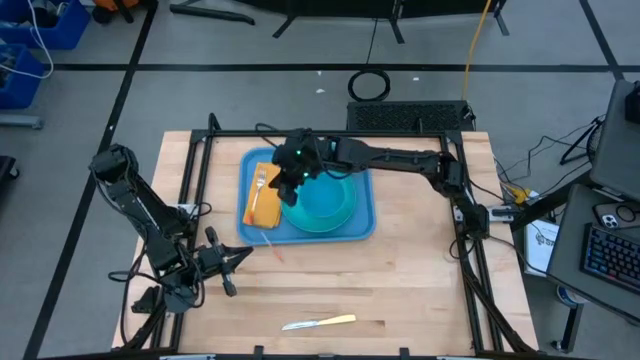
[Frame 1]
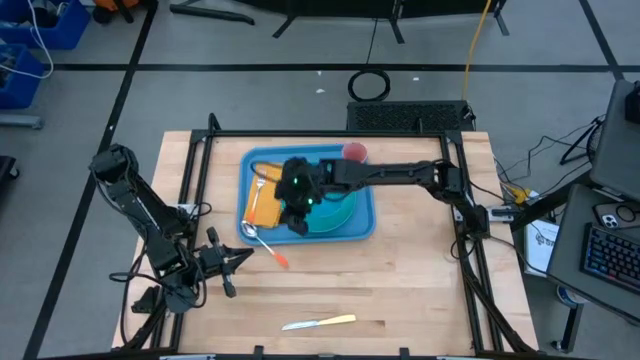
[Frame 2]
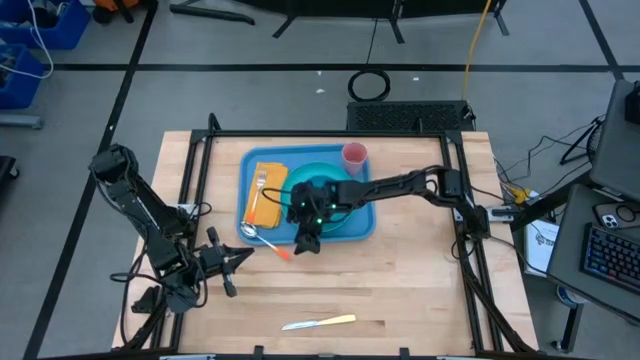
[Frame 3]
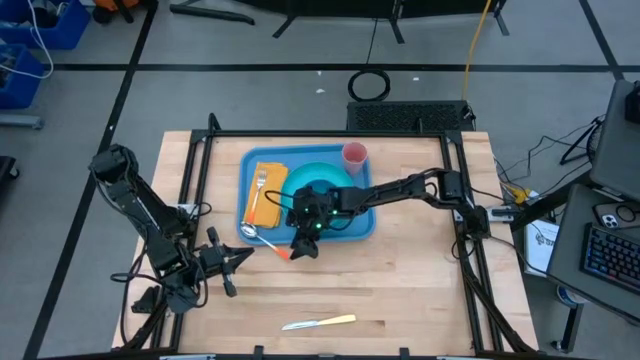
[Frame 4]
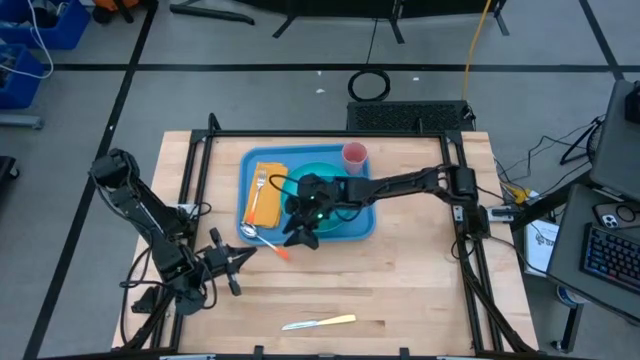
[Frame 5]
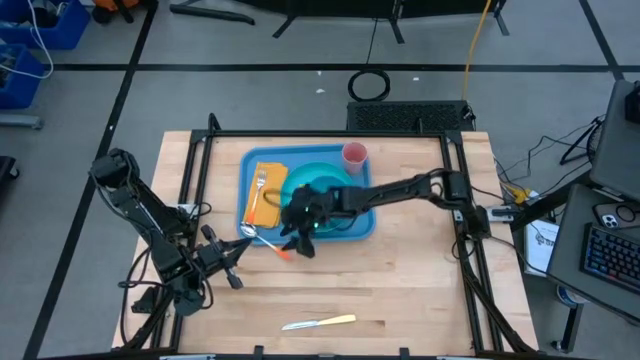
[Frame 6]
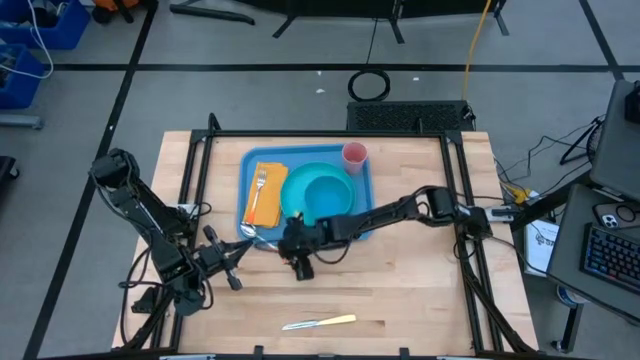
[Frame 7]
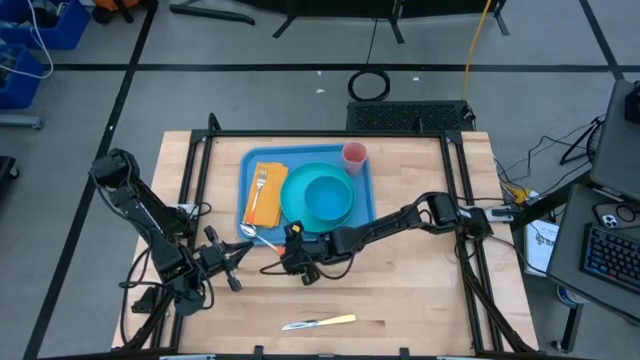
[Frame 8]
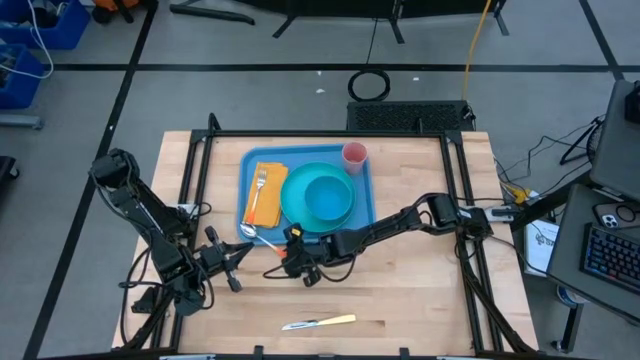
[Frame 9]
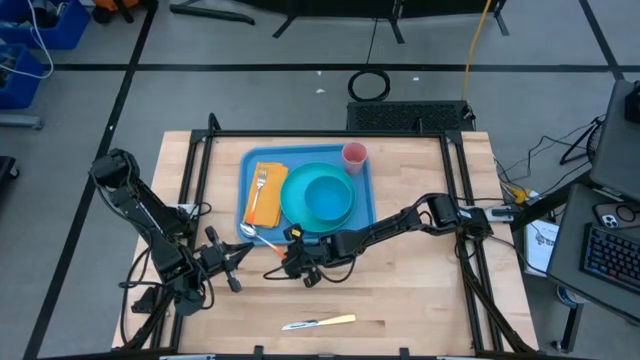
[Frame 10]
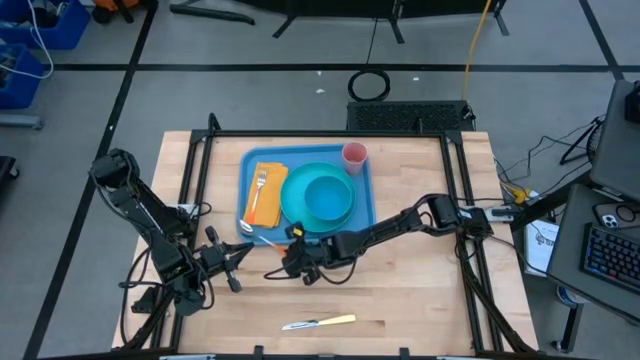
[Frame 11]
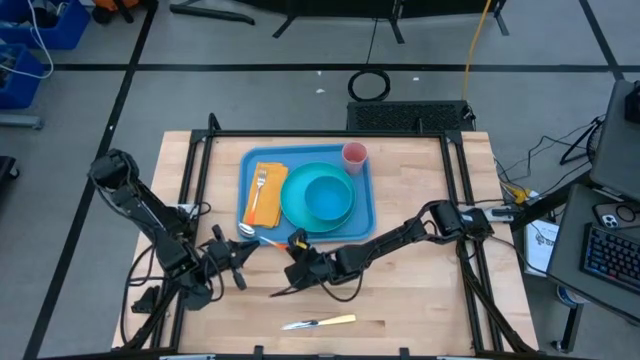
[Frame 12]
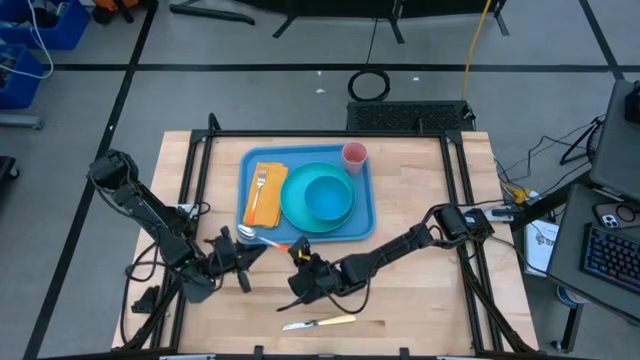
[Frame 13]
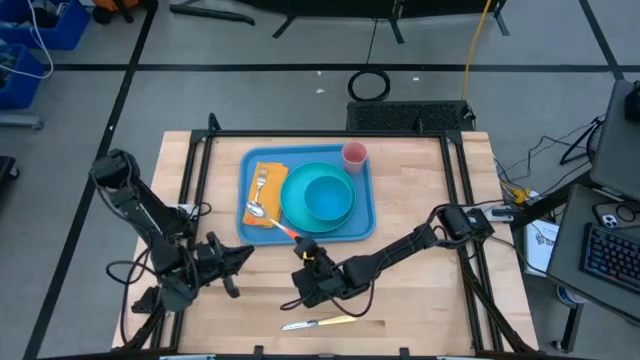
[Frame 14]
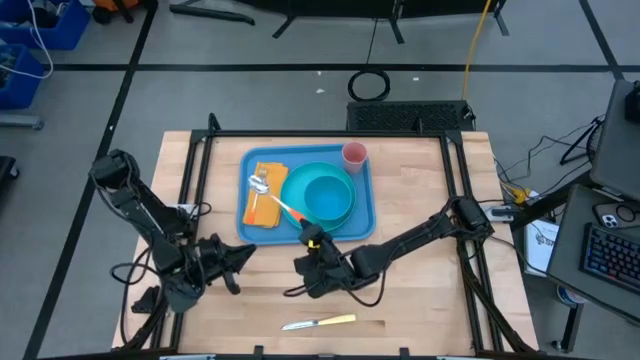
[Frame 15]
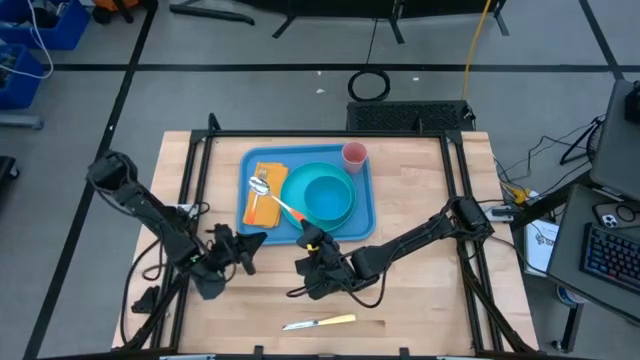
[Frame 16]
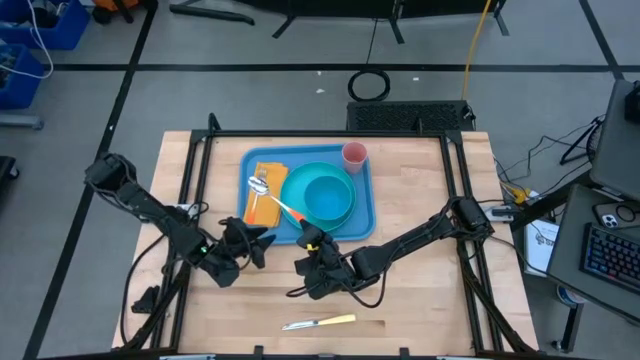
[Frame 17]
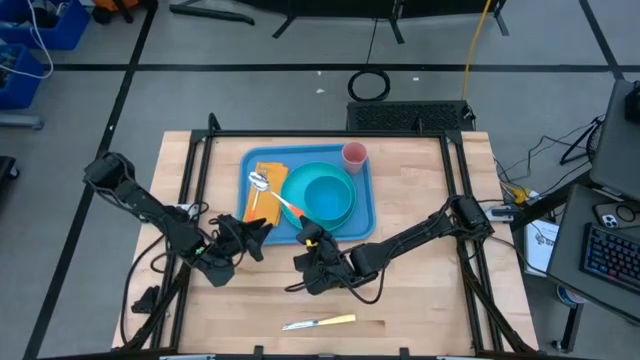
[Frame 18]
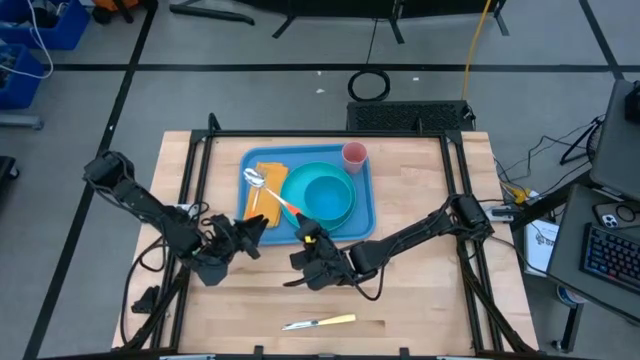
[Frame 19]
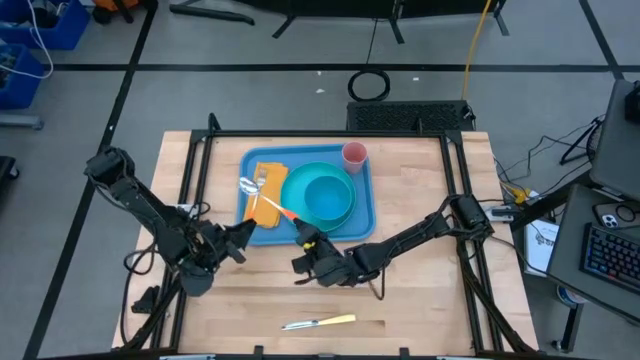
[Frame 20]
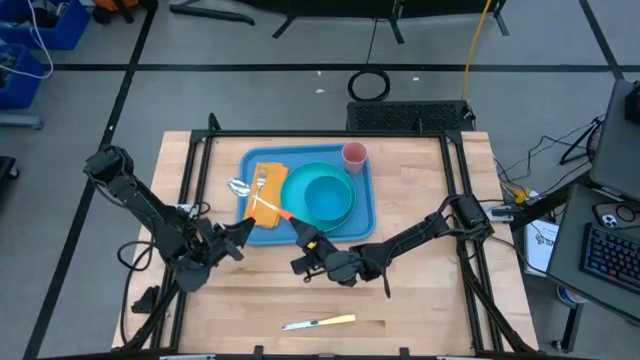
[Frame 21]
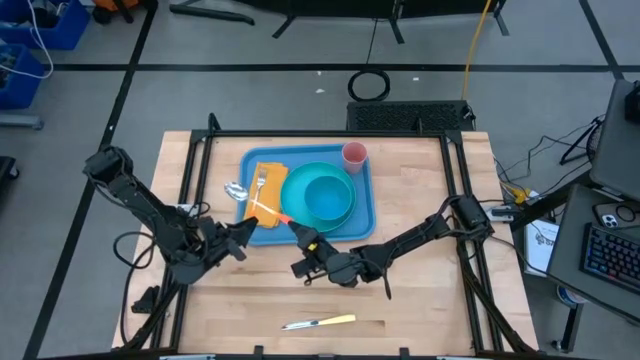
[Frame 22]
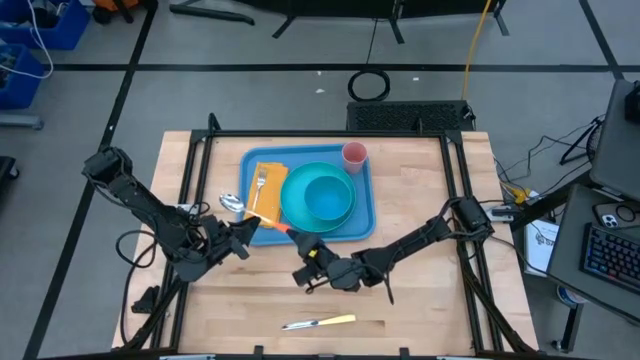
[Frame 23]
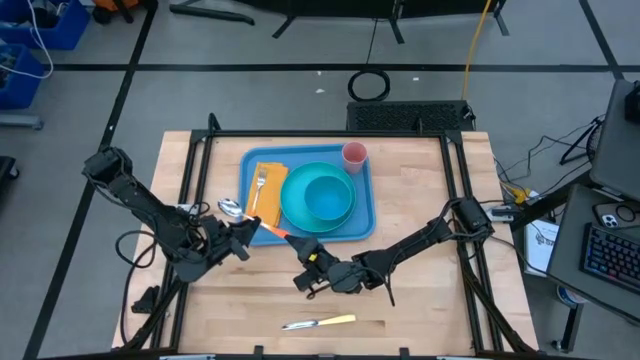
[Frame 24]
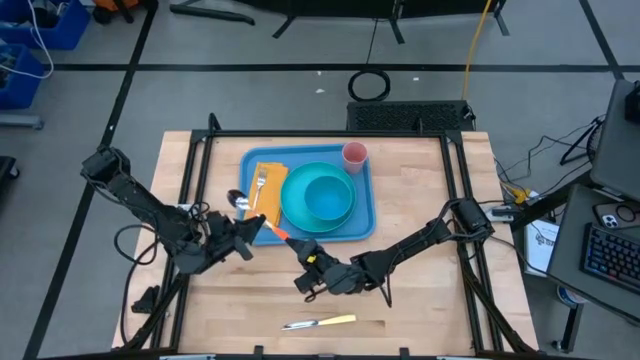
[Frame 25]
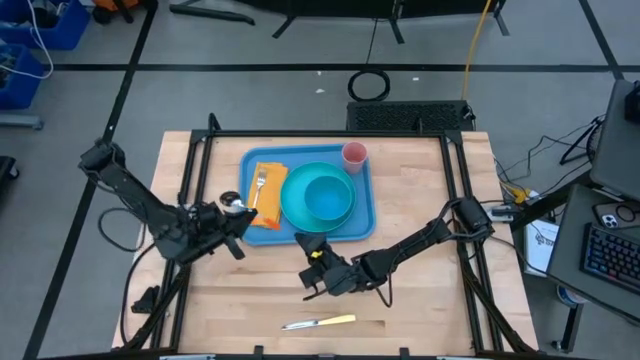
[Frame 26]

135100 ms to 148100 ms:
Task: Set up tray
Put the orange spoon on the yellow napkin to the right of the orange fork on the blue serving tray

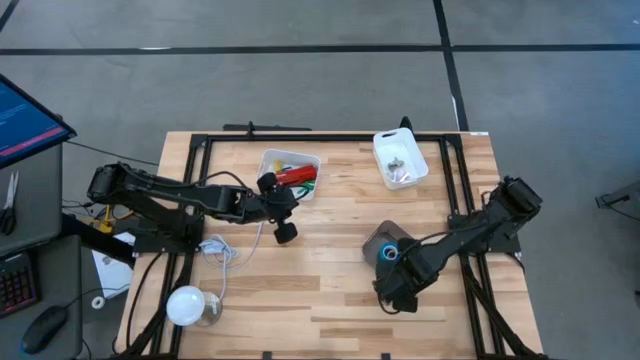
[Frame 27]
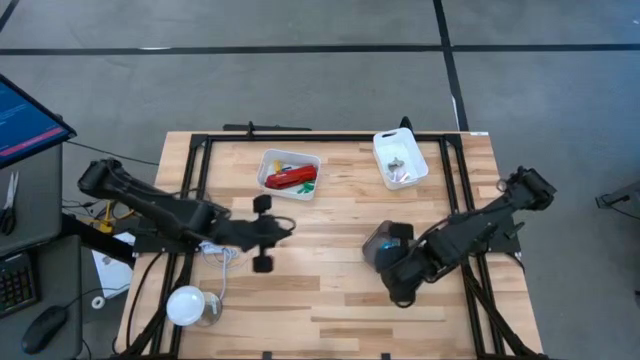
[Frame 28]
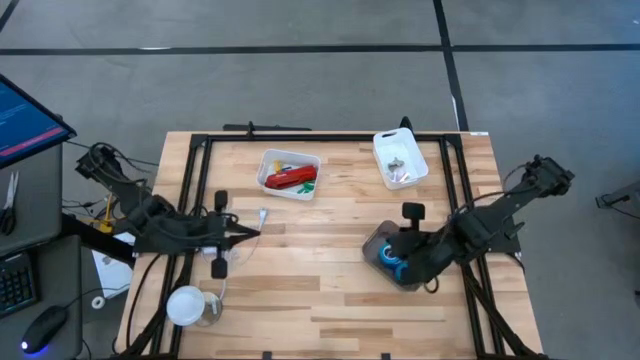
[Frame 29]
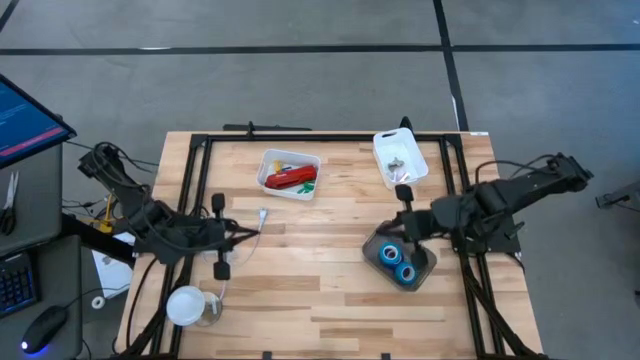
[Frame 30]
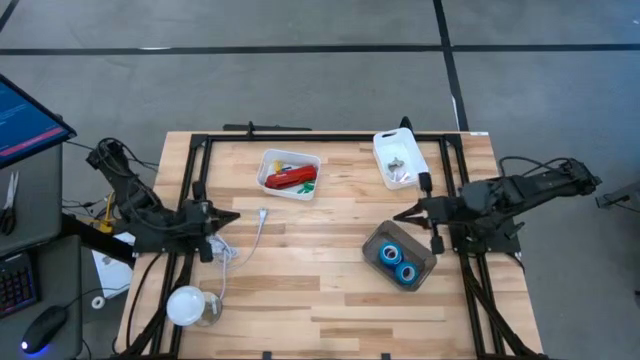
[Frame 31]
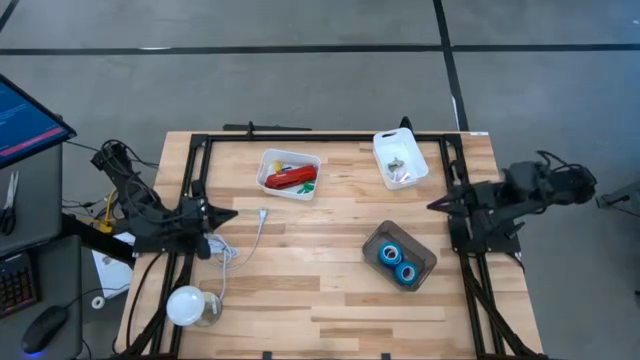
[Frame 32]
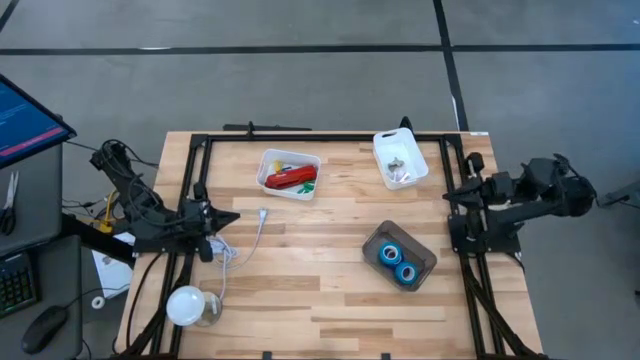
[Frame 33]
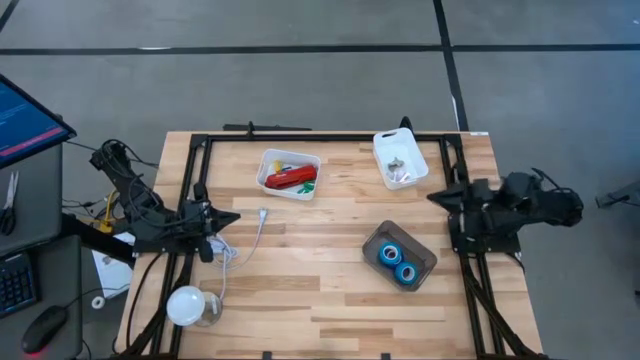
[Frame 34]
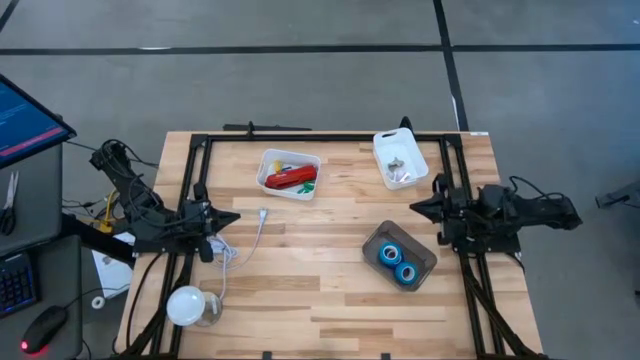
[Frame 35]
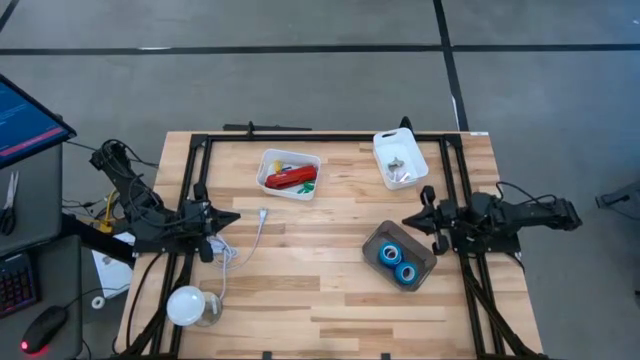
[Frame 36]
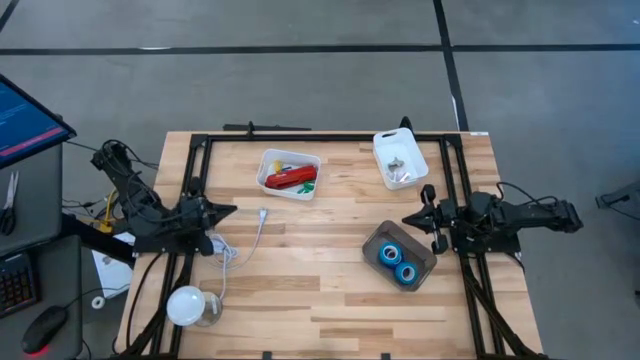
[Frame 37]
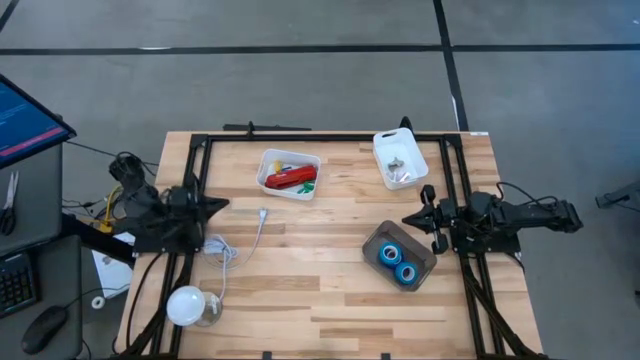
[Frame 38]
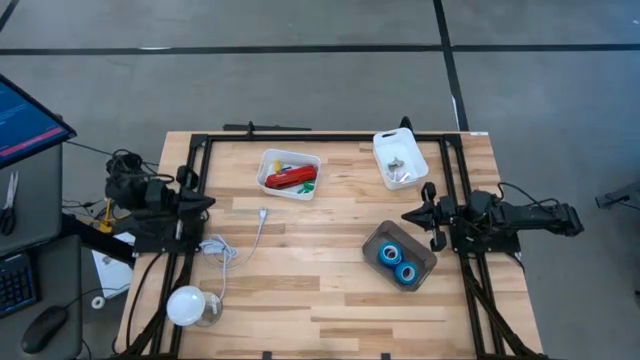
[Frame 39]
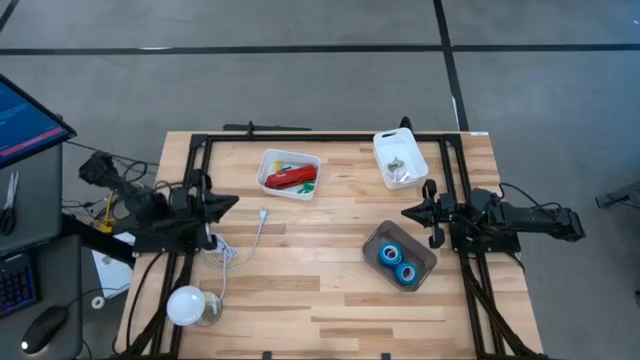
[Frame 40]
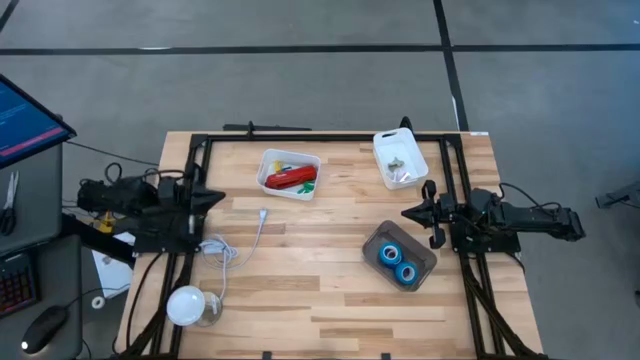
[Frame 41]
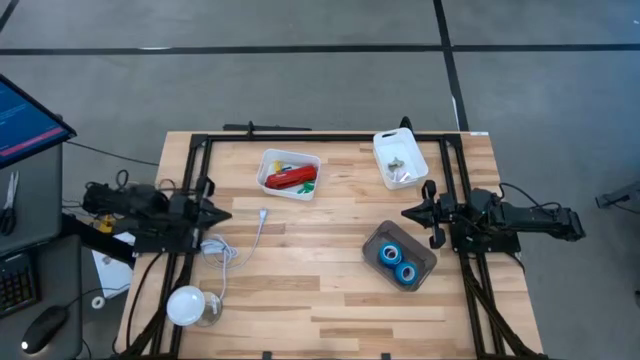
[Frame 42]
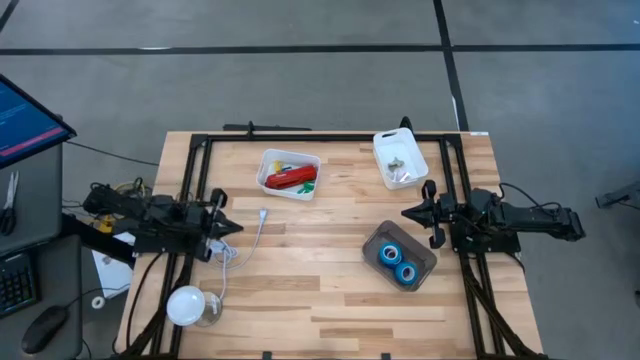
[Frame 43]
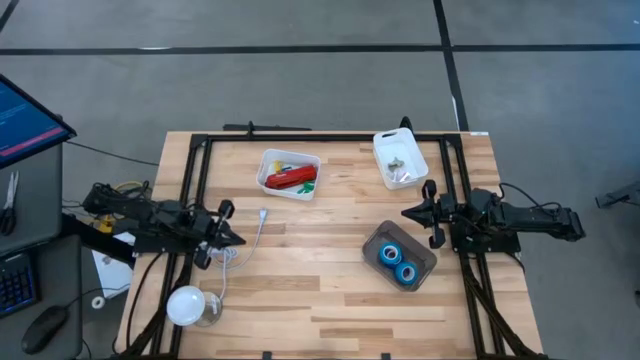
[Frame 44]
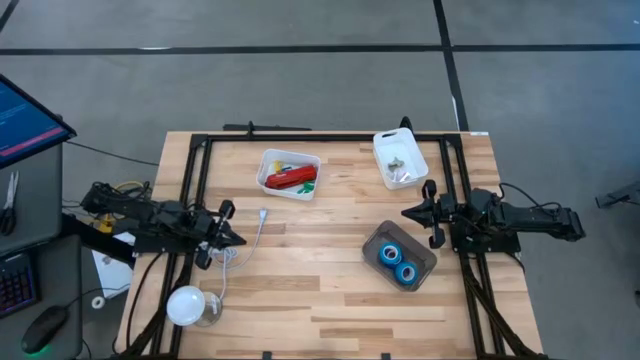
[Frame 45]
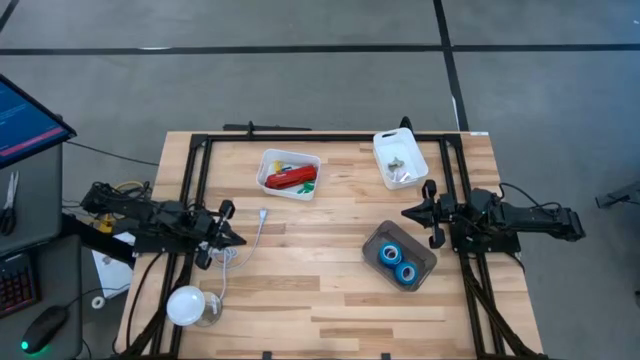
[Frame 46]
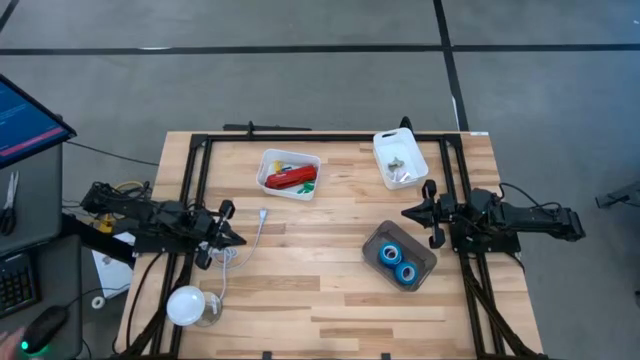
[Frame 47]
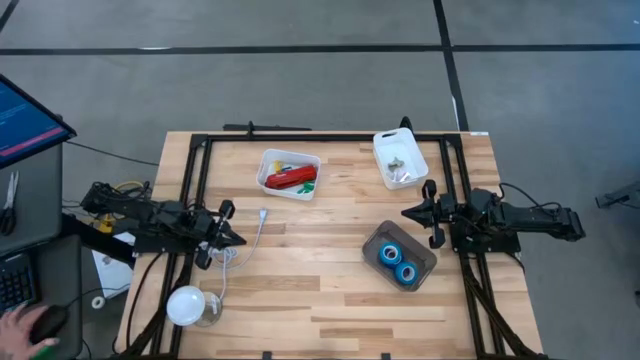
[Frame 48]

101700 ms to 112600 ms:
Task: Pick and place Stapler, Stapler remover, tape
Return to Home Position
